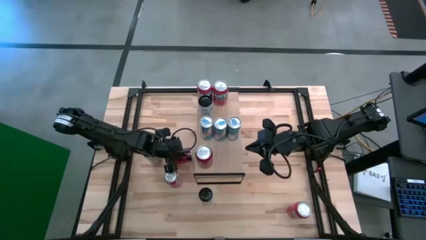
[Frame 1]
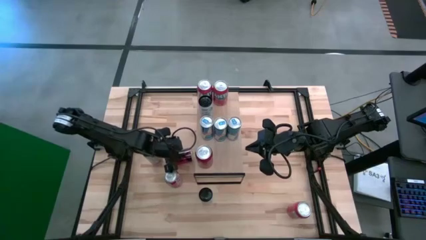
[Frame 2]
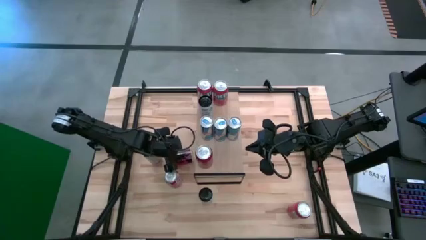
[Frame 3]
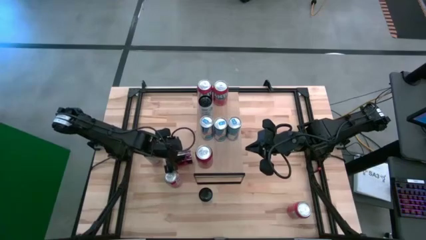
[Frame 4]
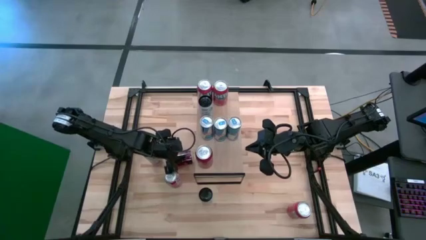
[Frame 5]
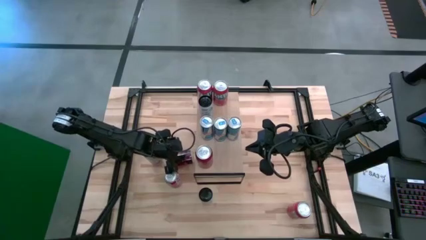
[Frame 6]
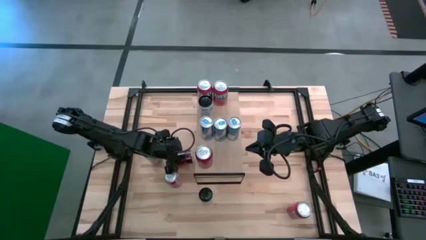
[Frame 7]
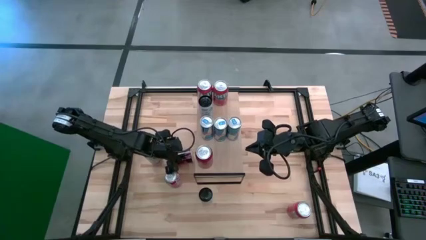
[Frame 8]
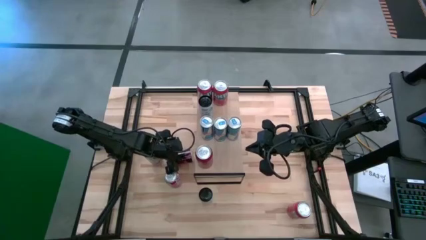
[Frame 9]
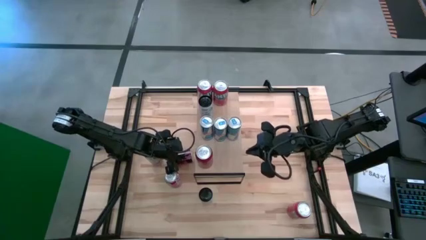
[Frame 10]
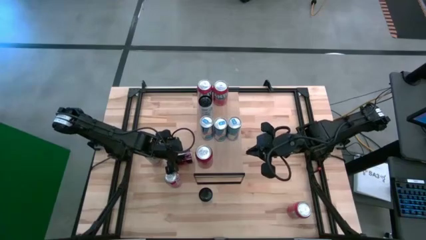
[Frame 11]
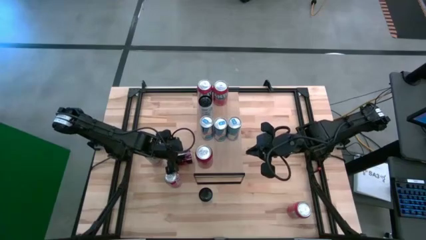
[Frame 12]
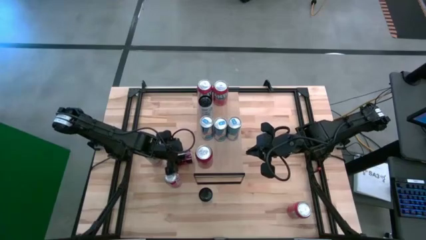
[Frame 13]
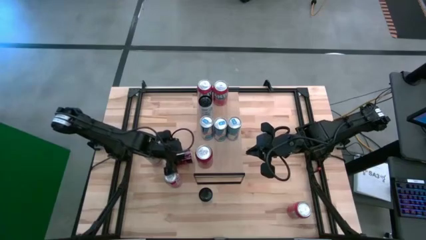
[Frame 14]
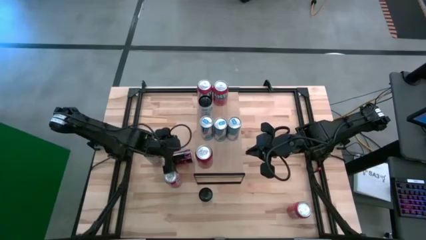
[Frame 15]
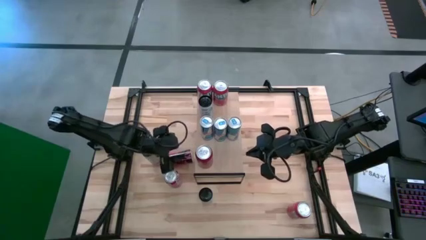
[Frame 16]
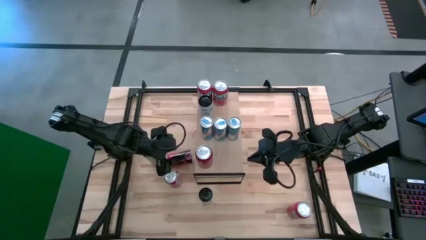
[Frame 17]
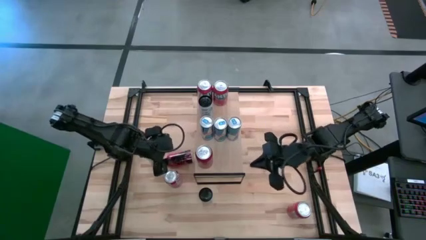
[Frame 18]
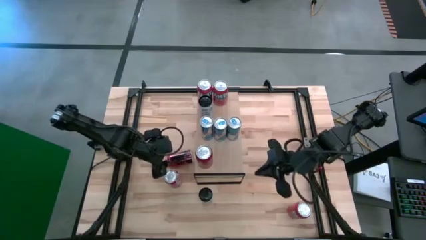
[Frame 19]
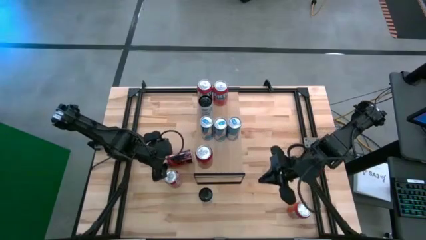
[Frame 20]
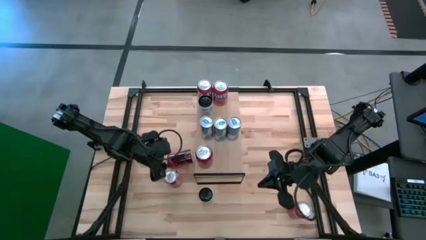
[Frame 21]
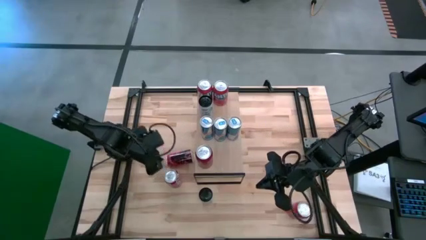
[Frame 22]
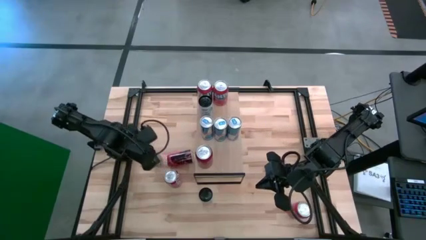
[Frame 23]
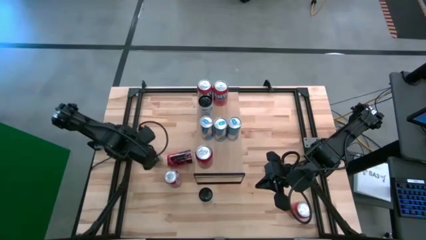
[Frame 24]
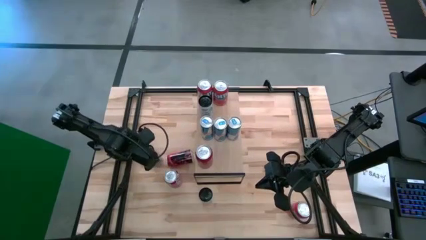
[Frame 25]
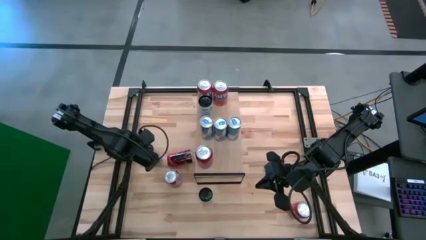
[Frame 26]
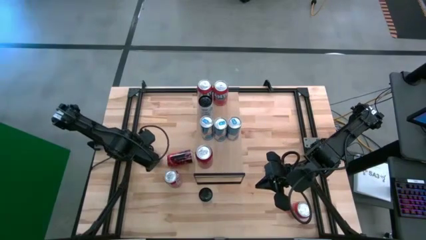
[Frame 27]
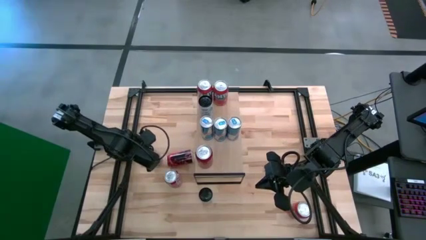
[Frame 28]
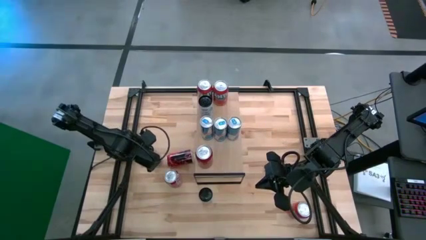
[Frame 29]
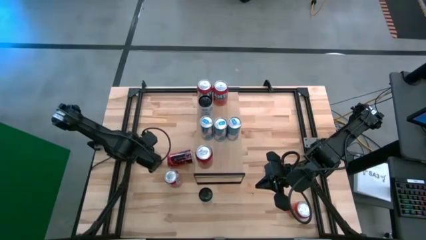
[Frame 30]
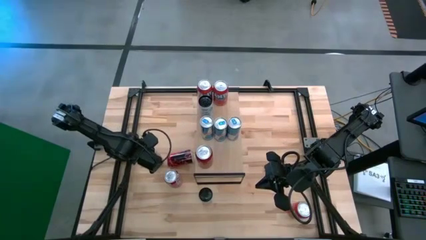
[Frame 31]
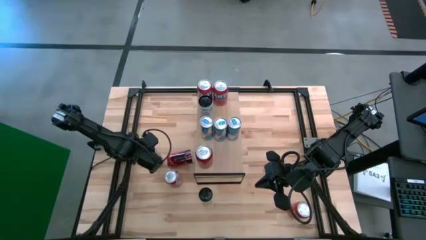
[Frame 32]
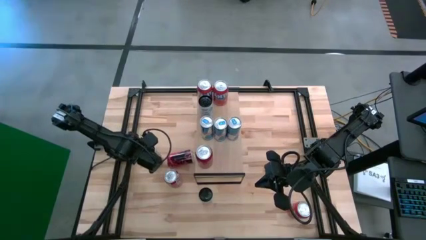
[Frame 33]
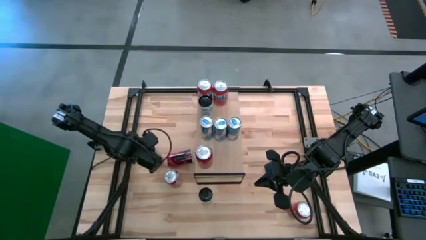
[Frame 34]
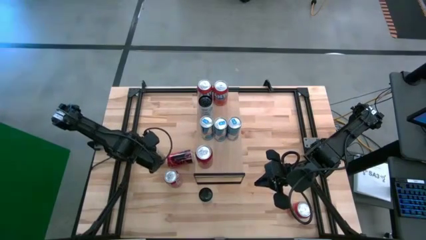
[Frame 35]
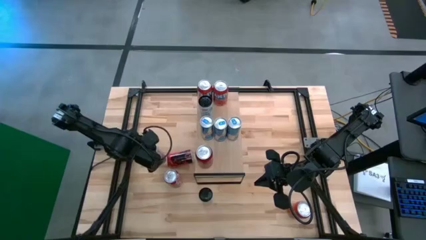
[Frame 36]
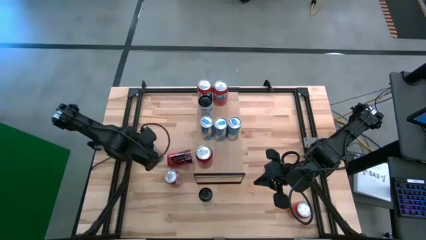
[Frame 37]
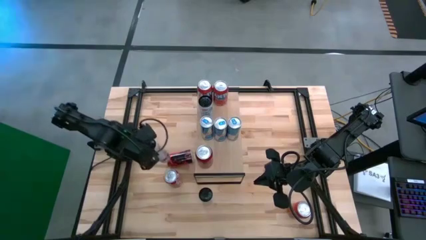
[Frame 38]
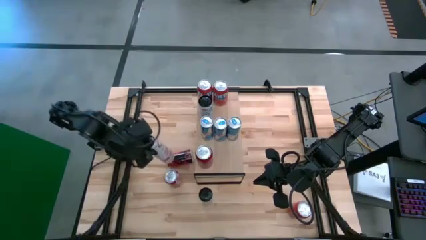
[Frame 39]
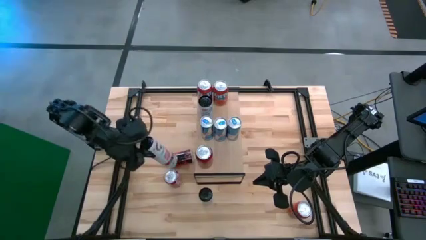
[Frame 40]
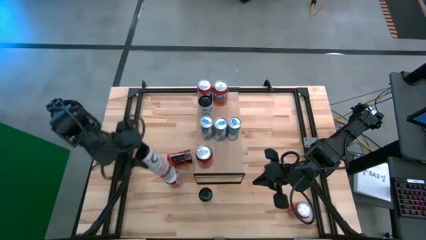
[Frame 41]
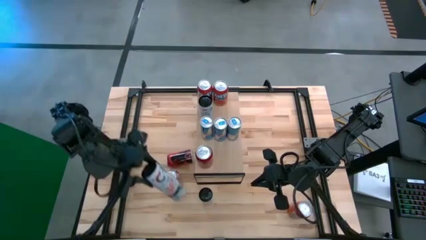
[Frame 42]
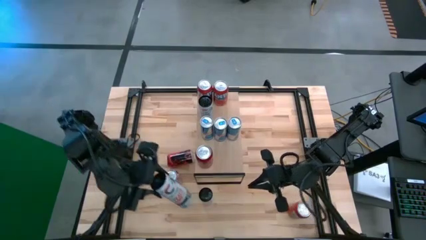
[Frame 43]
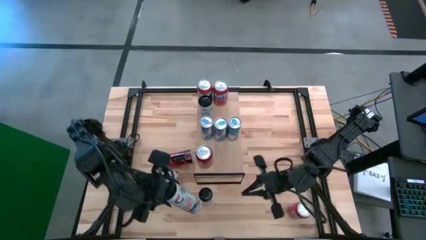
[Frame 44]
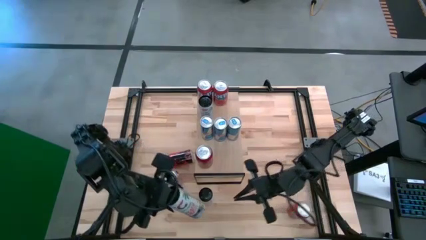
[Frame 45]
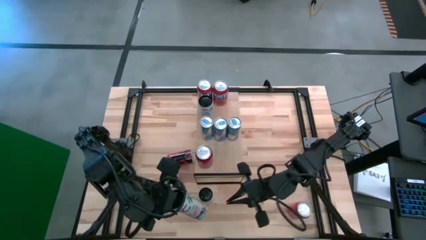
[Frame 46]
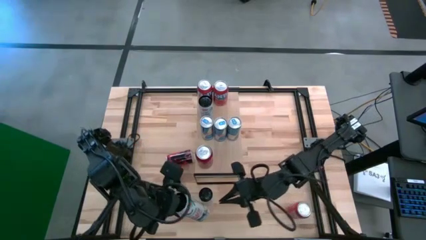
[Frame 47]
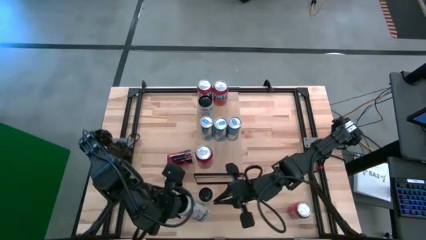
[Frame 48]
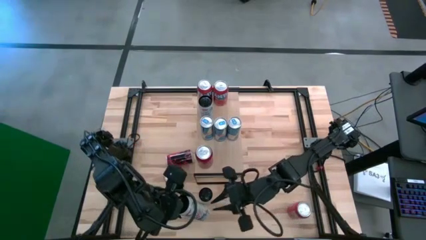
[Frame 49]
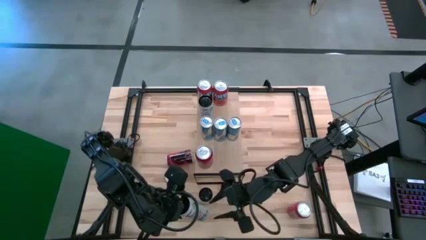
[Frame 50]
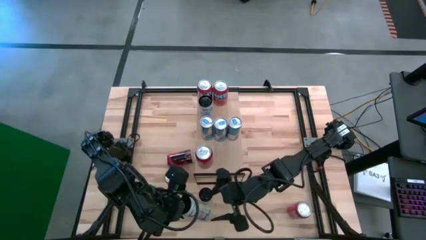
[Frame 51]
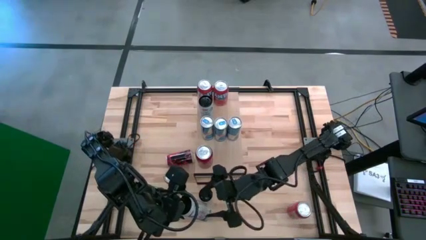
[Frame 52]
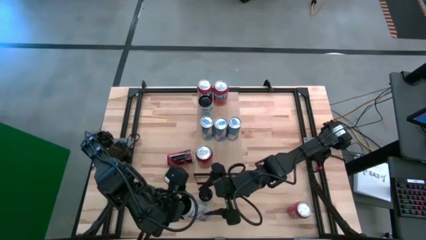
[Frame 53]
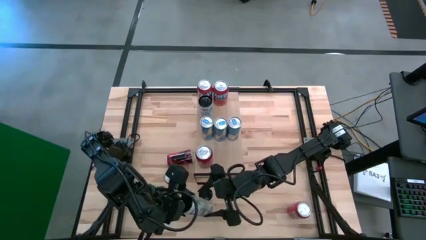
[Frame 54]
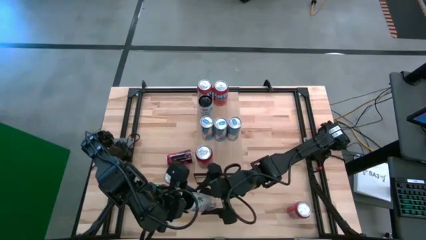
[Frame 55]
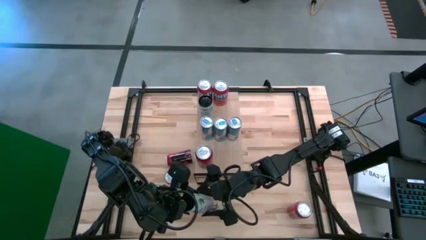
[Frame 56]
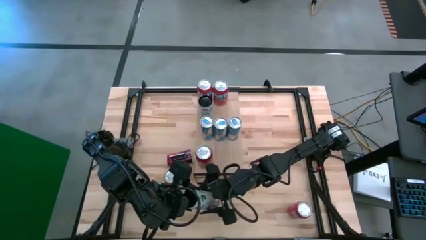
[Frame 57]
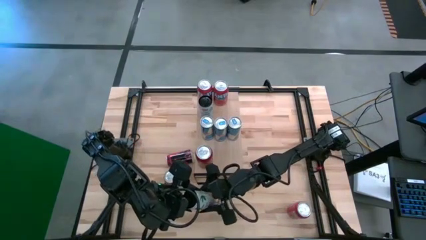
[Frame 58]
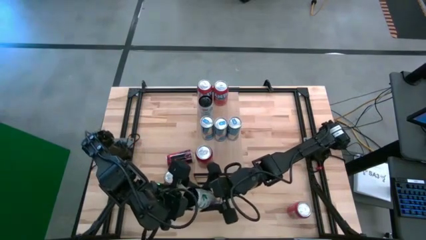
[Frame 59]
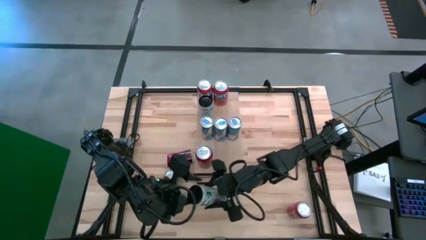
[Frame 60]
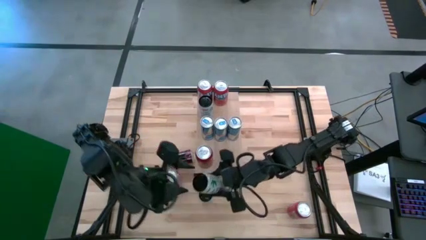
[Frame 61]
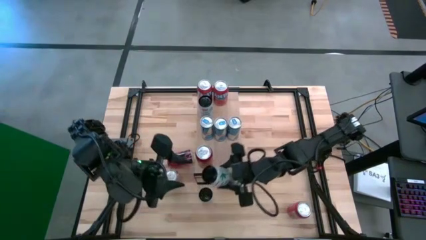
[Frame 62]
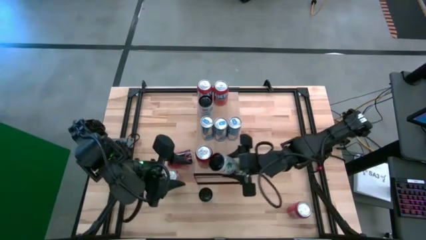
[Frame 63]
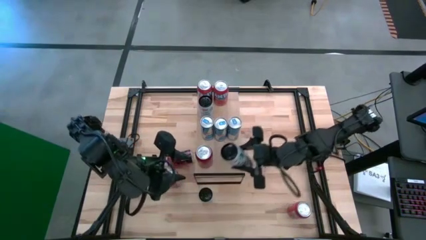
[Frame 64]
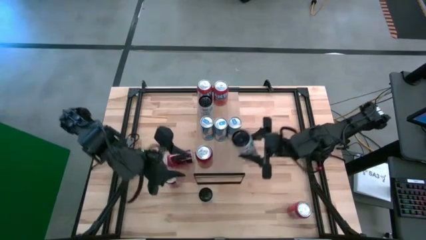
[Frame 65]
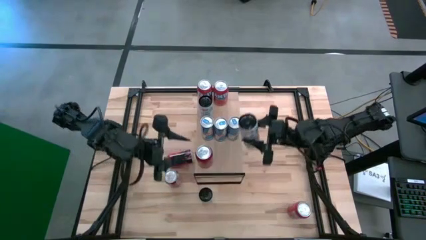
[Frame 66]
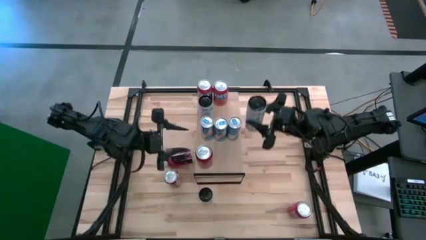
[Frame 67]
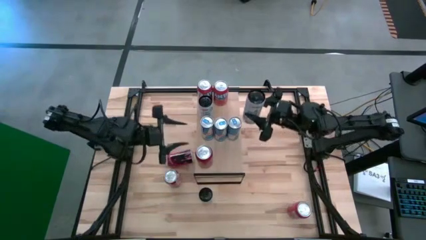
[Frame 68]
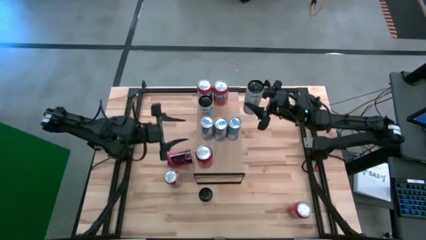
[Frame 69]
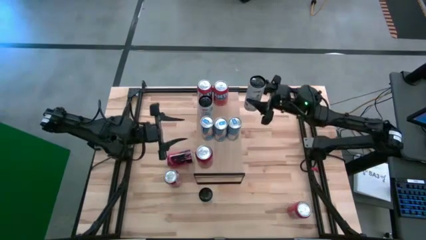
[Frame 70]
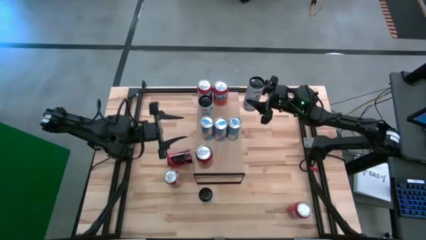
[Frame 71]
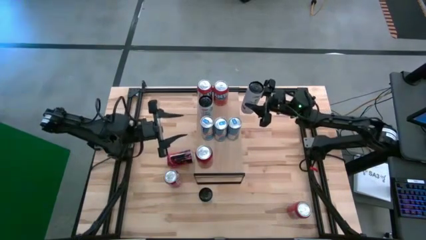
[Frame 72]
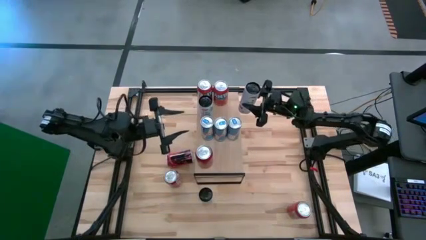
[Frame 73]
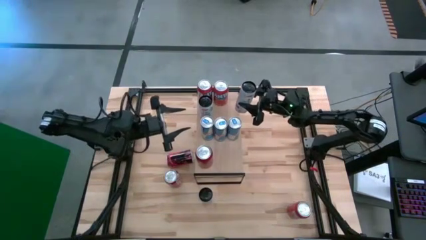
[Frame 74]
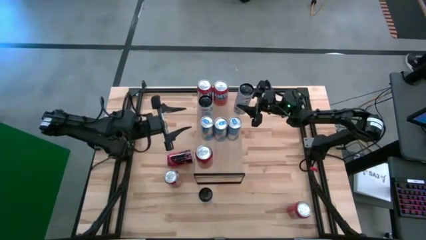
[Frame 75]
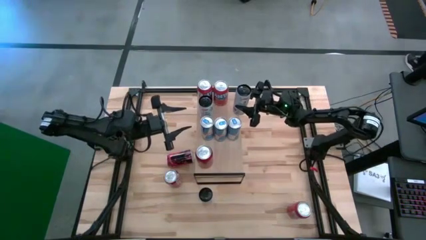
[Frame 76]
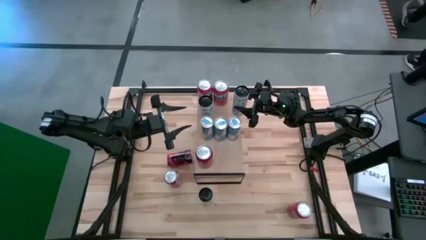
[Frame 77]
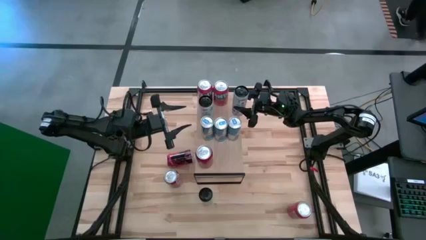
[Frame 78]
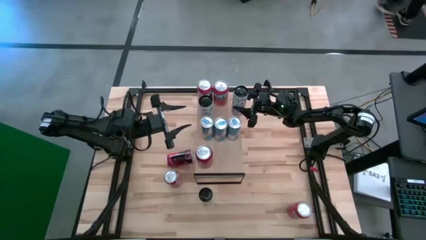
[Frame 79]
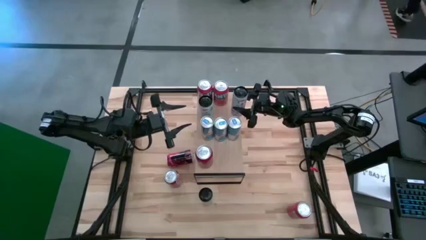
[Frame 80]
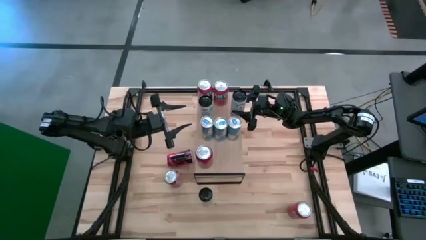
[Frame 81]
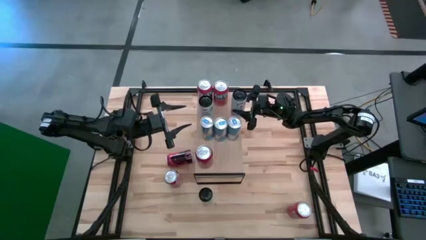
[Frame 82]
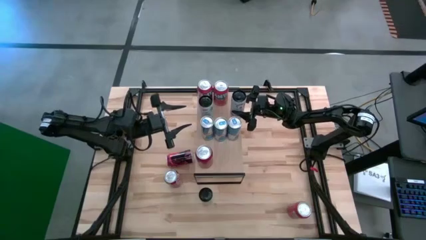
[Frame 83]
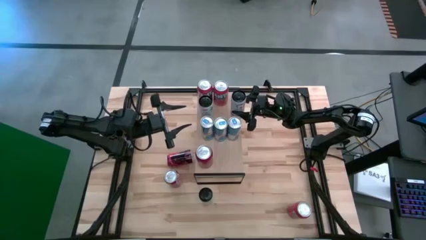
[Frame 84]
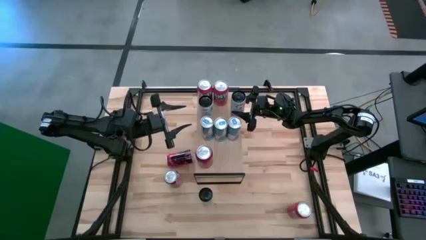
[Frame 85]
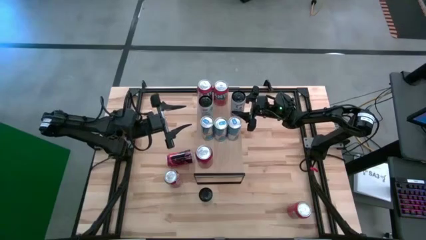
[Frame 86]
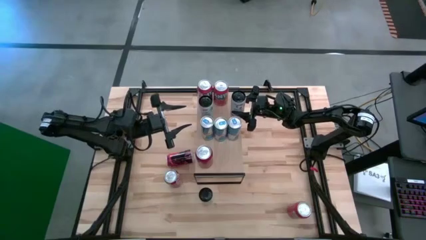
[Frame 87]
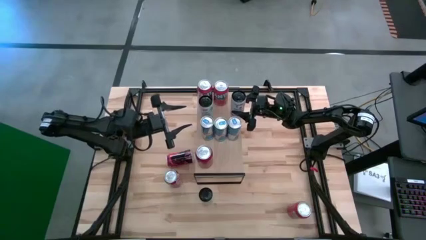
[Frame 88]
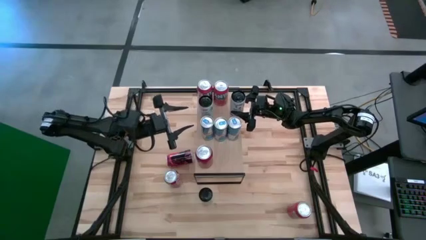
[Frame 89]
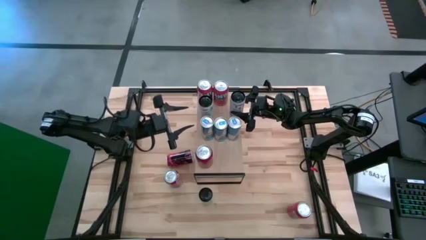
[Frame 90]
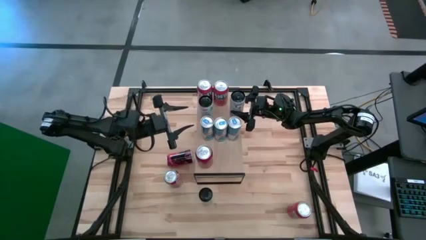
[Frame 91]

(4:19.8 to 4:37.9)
Task: Place canned beverage on shelf
Put the left white pink soda can on the shelf aligned with the other white pink soda can
